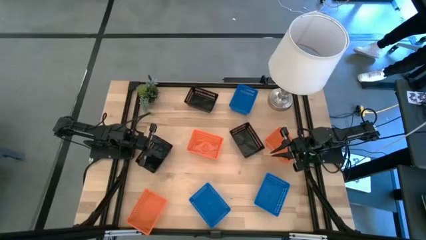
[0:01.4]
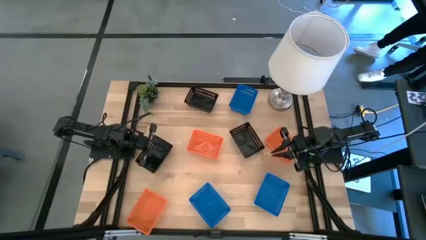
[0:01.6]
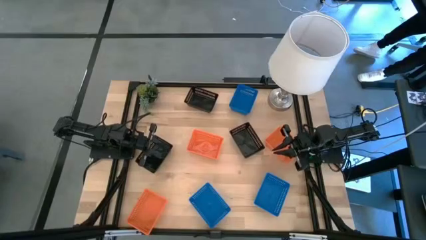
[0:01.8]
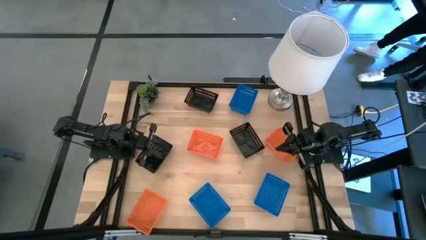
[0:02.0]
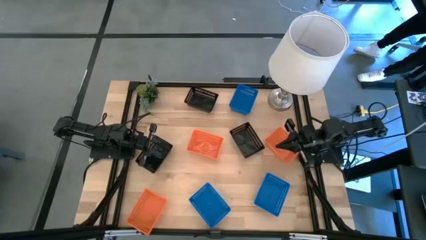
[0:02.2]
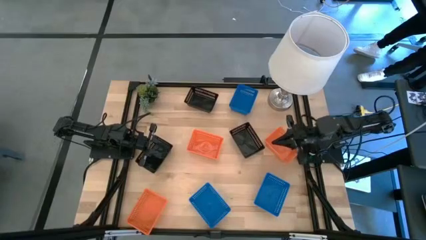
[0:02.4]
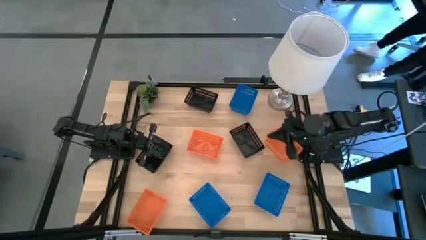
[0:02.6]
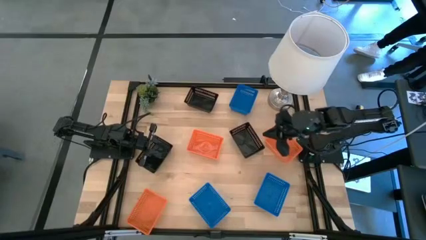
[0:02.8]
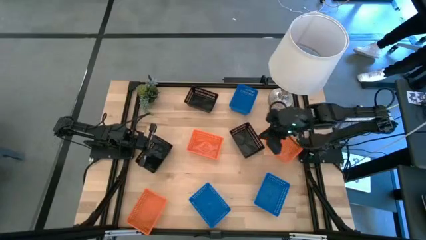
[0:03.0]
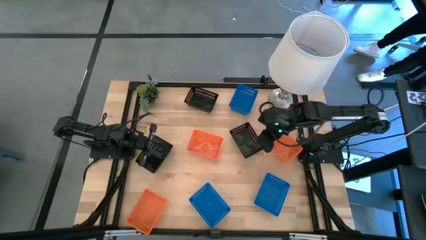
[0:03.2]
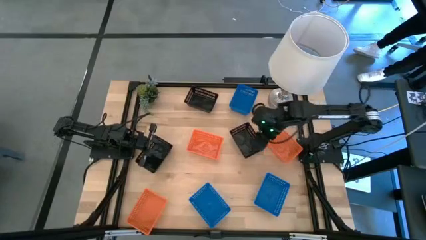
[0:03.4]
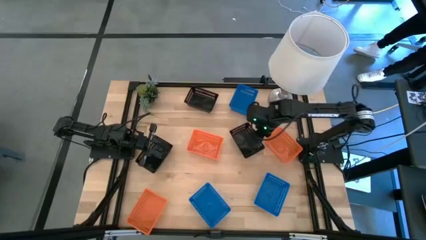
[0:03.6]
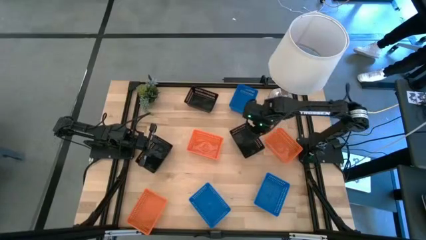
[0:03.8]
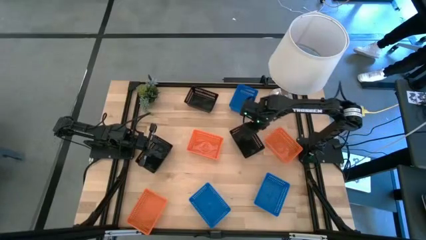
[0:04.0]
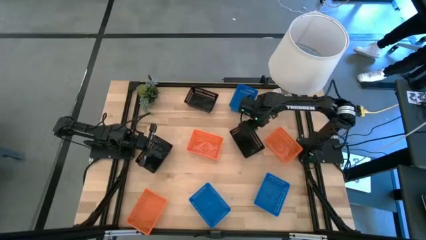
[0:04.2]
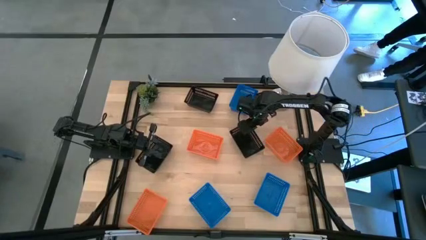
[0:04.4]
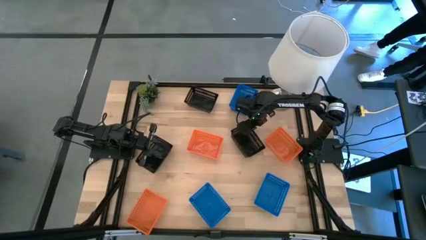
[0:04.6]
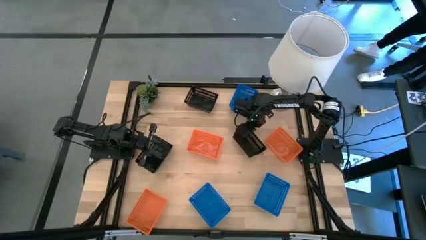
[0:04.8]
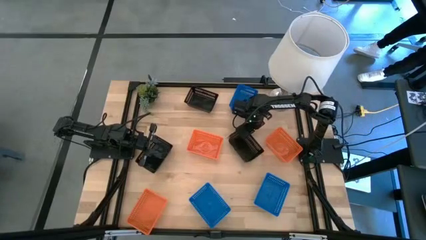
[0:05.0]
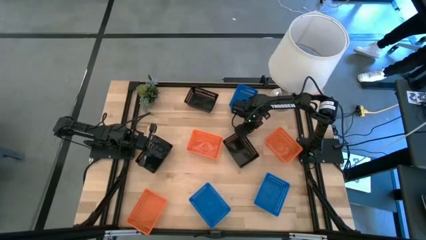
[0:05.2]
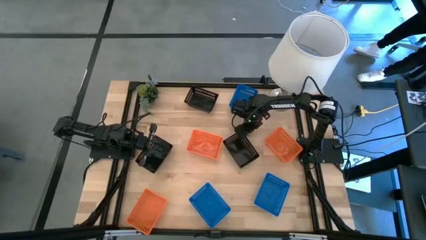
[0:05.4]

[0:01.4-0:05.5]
Stack the bottom right black bin on the top black bin

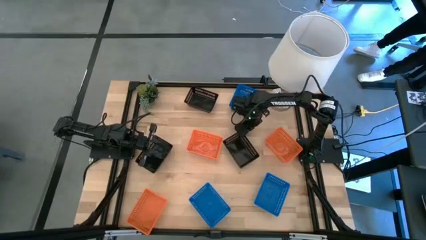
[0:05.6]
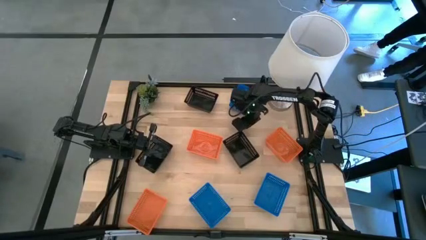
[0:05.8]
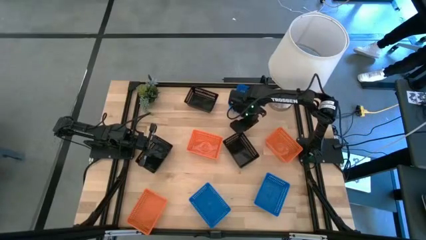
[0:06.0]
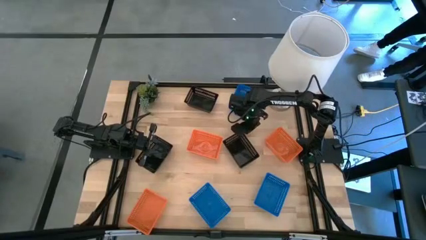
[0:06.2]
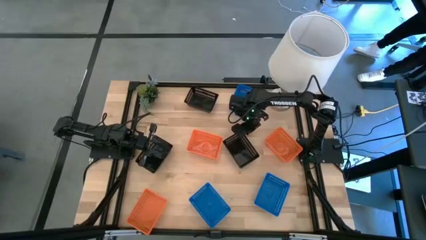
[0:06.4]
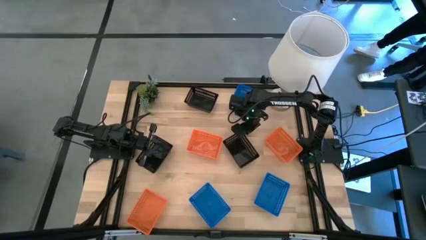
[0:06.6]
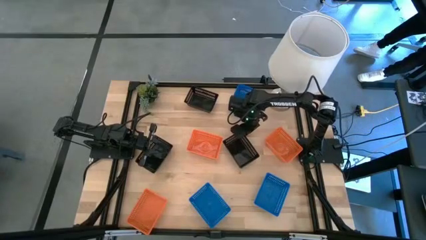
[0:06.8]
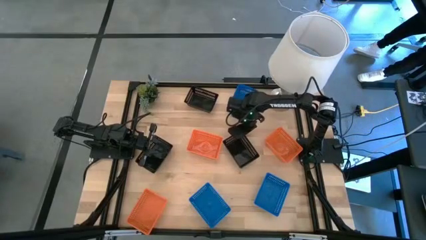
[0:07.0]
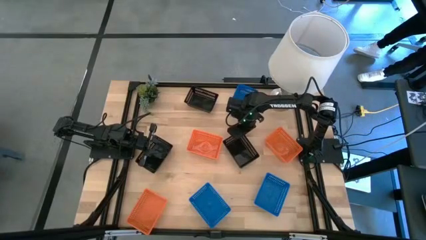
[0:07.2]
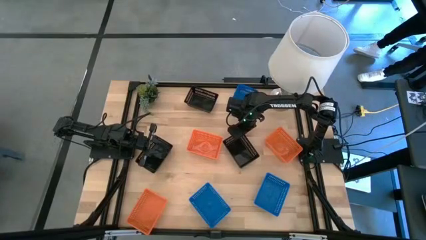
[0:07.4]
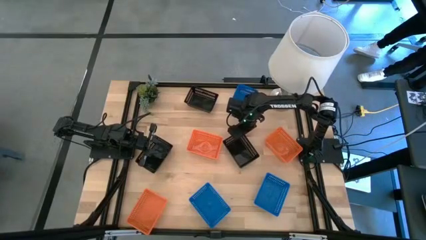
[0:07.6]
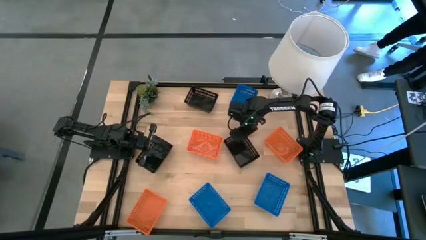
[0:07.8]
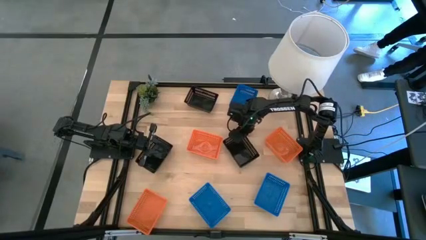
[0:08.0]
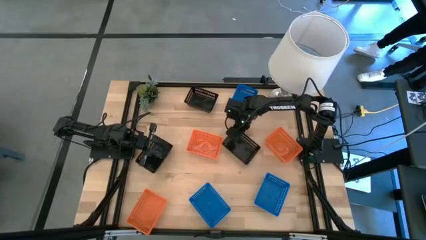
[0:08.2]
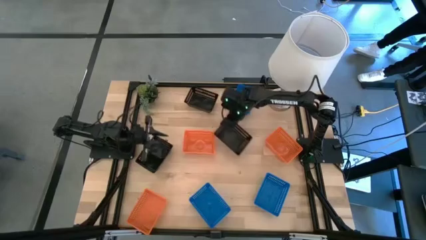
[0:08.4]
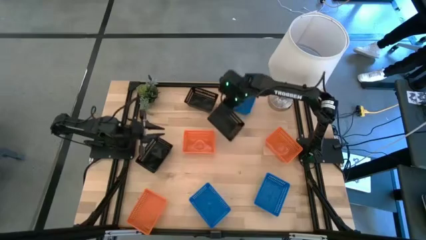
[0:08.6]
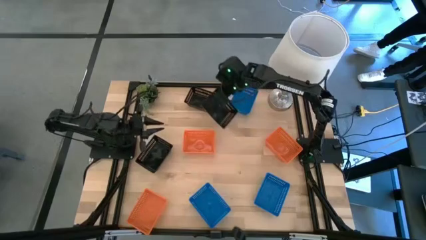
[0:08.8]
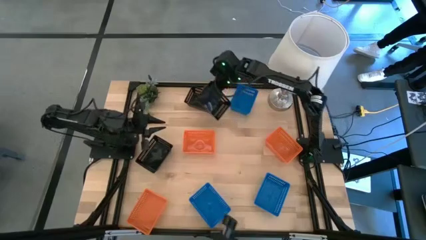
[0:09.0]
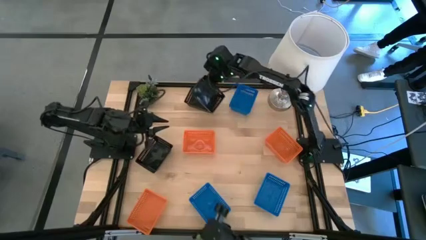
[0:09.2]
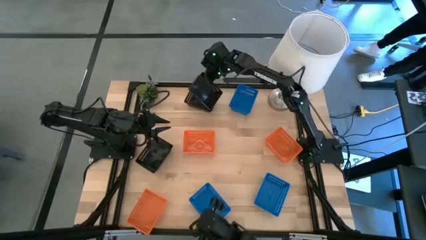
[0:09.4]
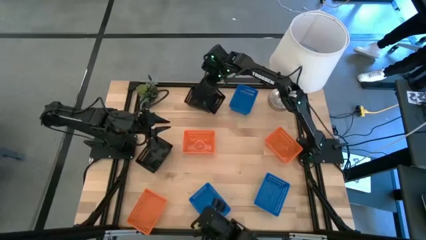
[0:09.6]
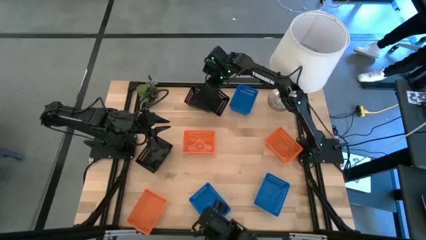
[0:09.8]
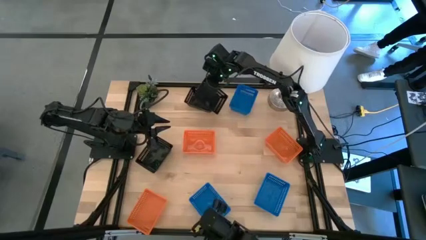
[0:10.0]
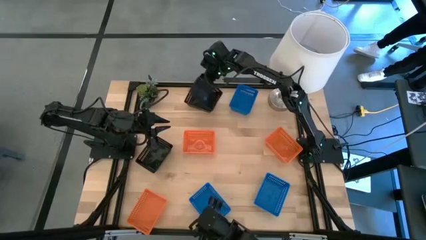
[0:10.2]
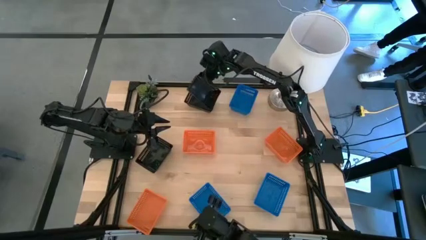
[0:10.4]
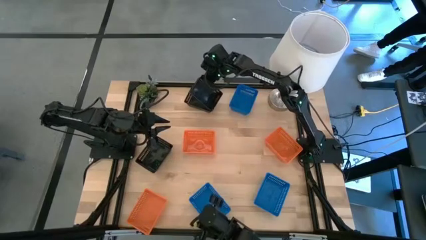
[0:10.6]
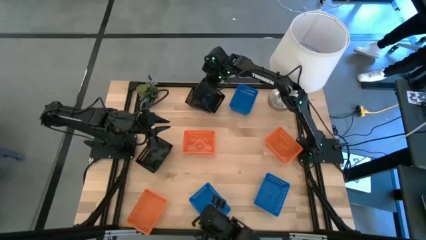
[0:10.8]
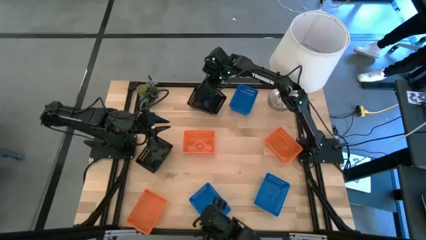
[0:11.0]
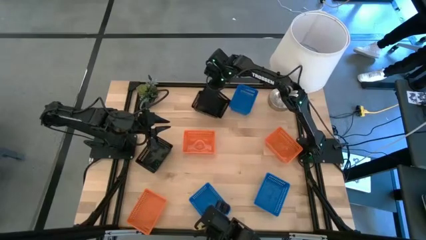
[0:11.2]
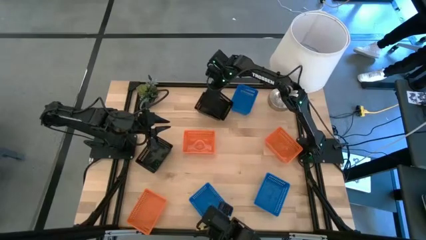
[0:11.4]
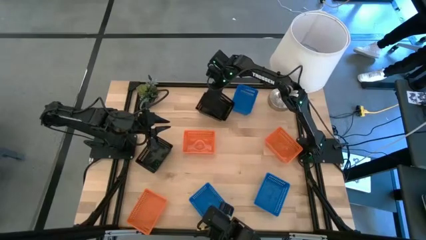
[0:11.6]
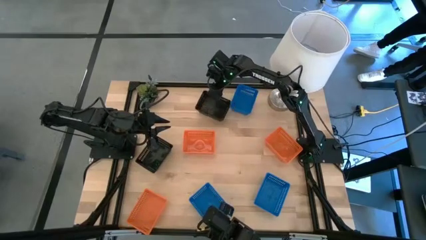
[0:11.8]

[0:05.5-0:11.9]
Stack the bottom right black bin on the top black bin

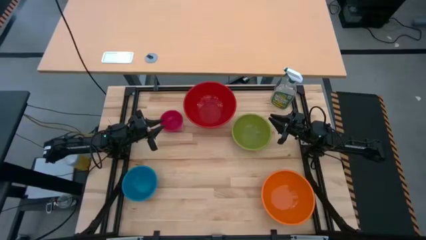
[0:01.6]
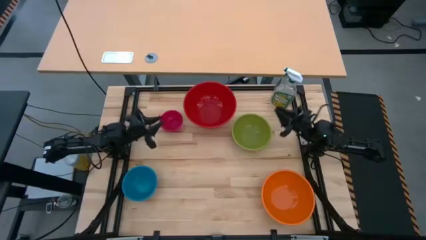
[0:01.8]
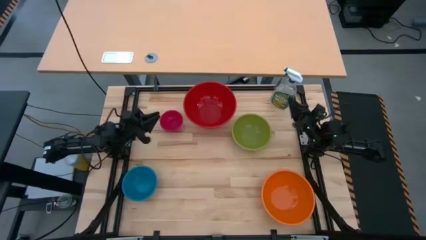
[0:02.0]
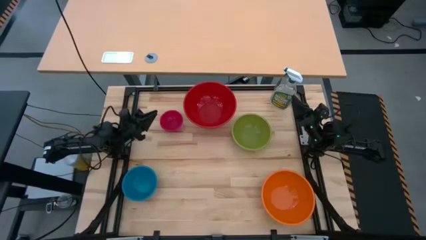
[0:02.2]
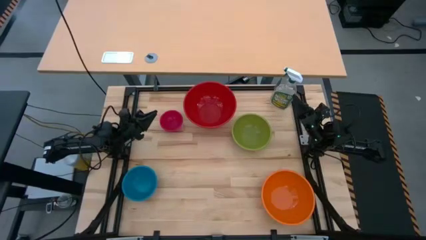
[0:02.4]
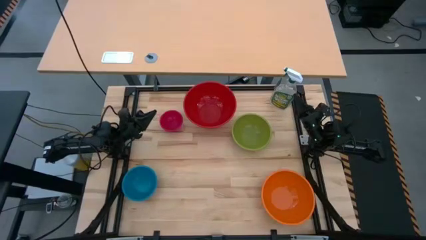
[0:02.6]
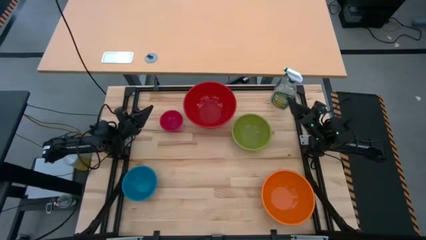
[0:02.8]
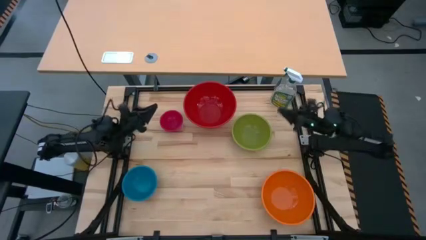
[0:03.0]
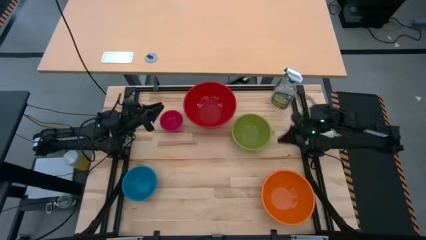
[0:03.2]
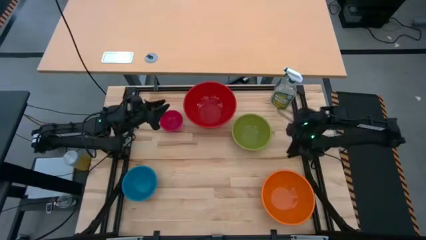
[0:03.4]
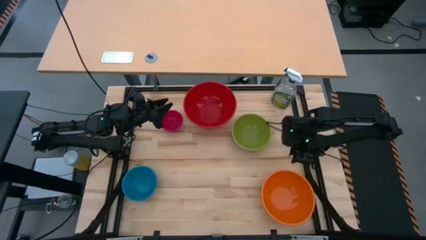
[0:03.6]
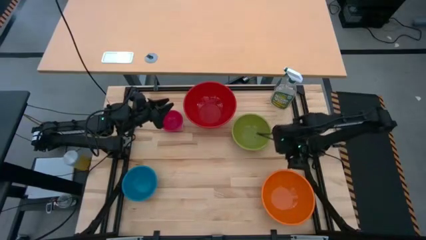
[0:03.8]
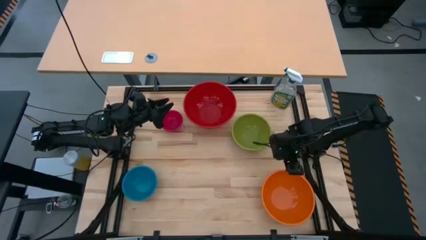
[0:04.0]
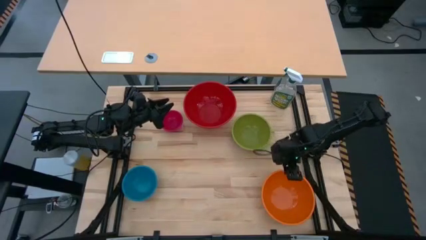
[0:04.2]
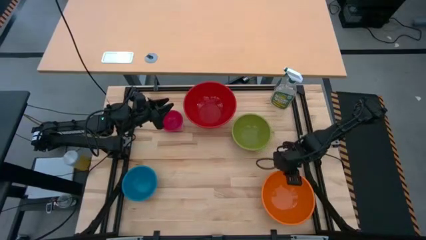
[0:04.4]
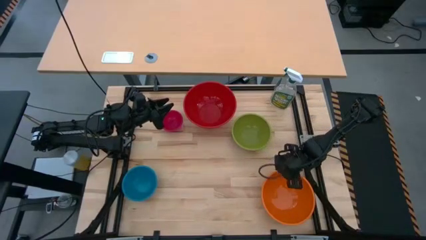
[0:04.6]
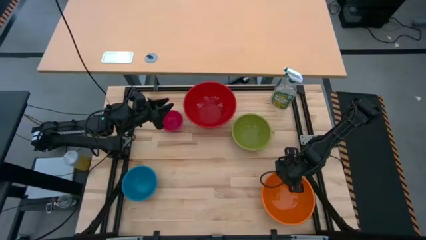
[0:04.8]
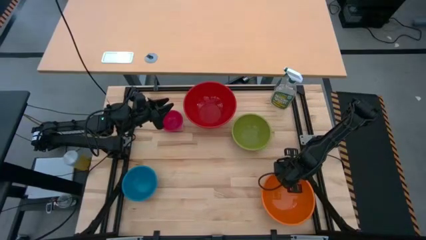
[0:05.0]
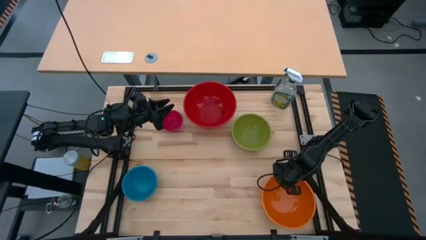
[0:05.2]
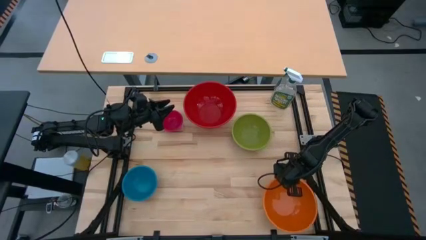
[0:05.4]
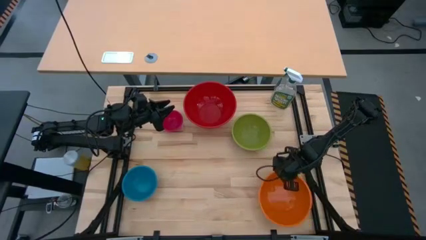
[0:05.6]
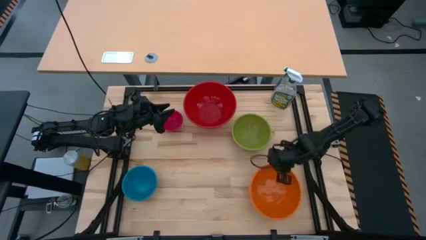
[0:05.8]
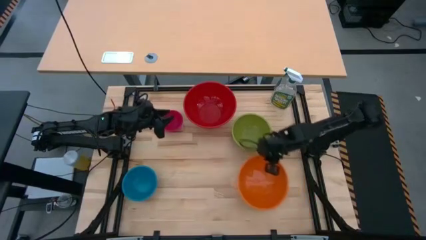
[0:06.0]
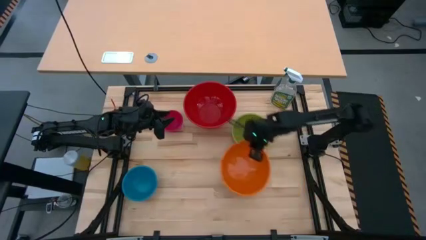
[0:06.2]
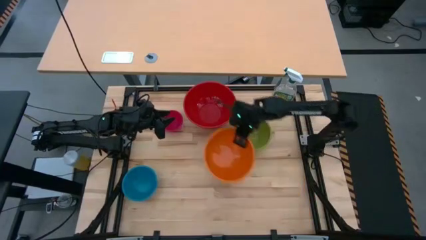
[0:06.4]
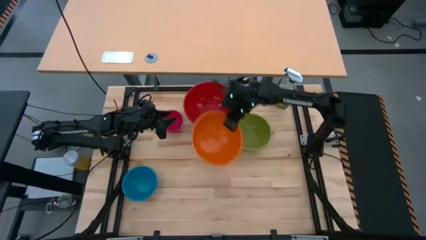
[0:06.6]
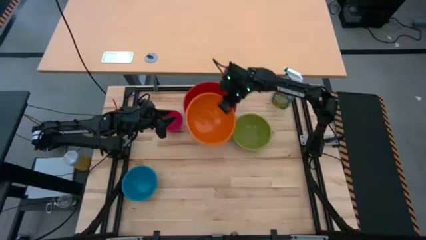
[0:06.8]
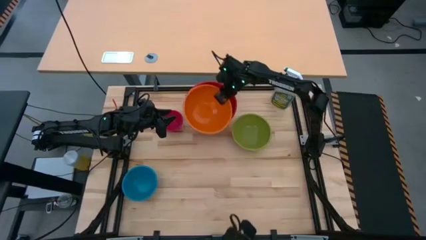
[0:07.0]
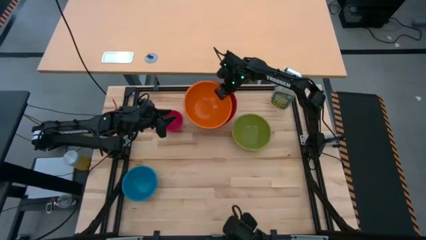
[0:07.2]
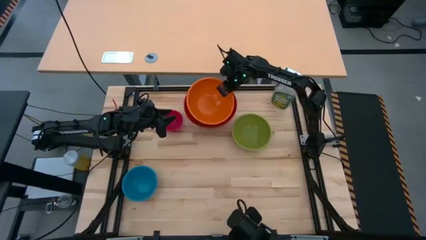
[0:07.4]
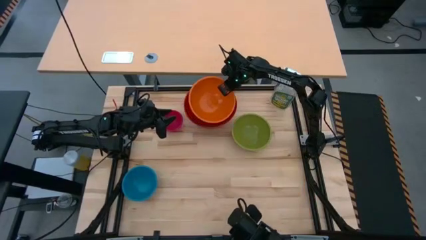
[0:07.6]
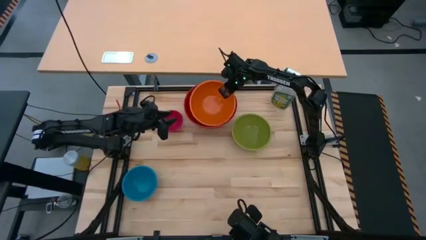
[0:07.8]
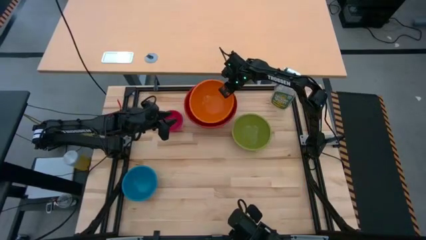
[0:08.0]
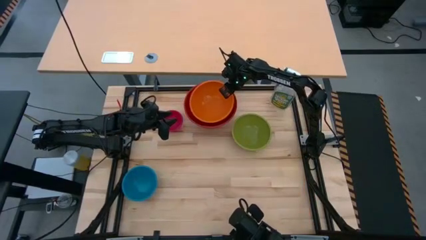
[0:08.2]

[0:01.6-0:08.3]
Stack the orange bowl on top of the red bowl
